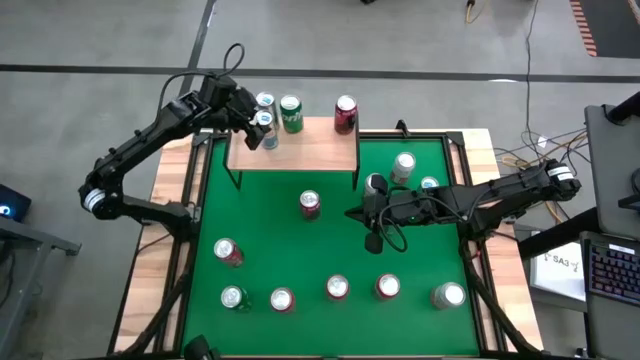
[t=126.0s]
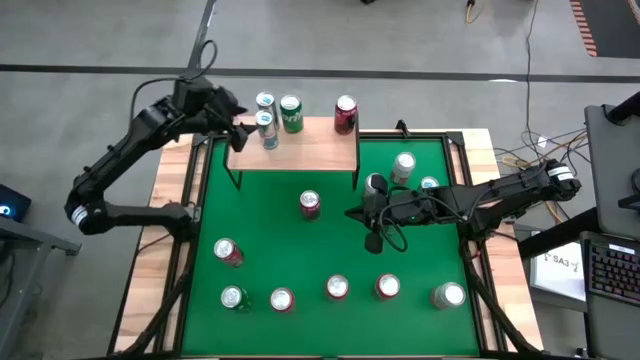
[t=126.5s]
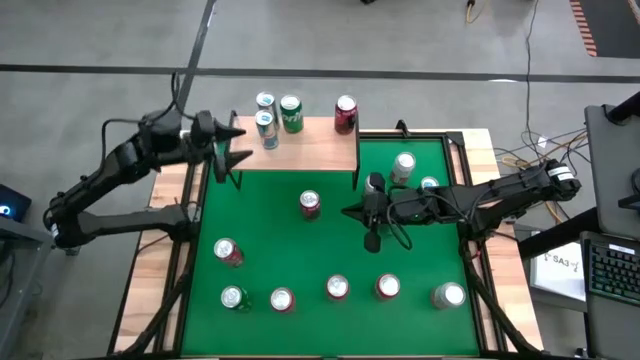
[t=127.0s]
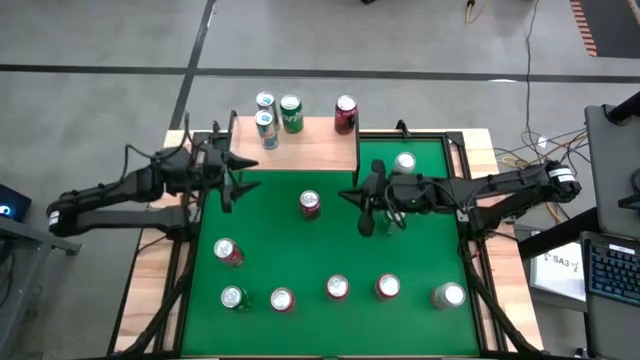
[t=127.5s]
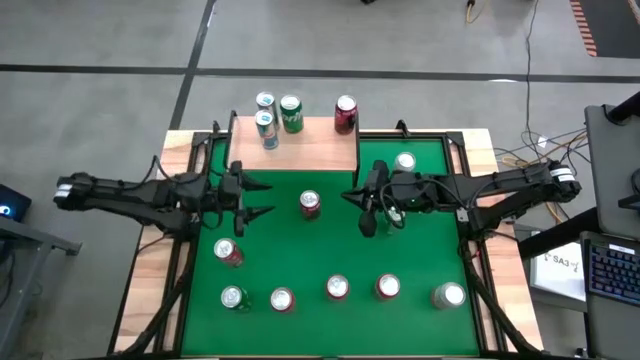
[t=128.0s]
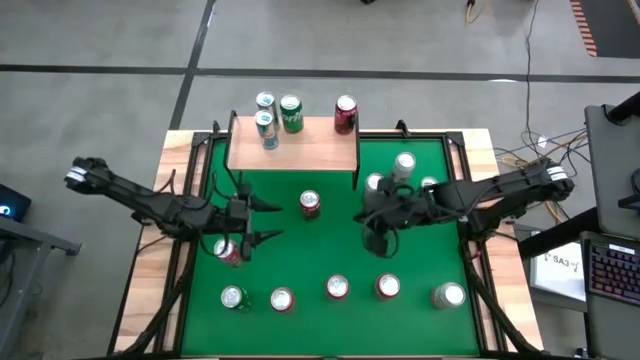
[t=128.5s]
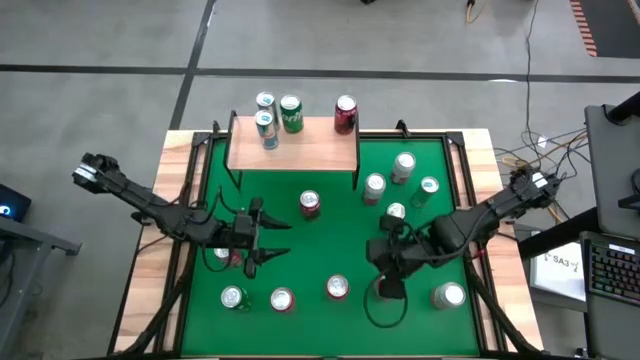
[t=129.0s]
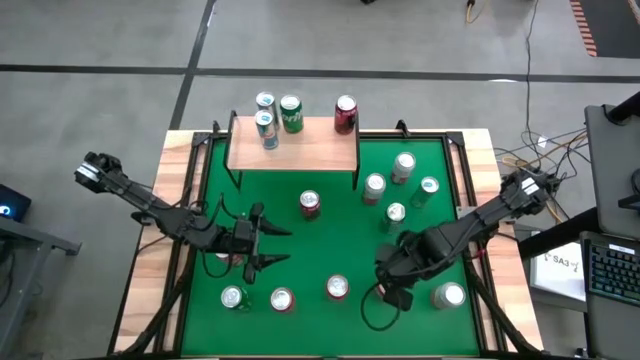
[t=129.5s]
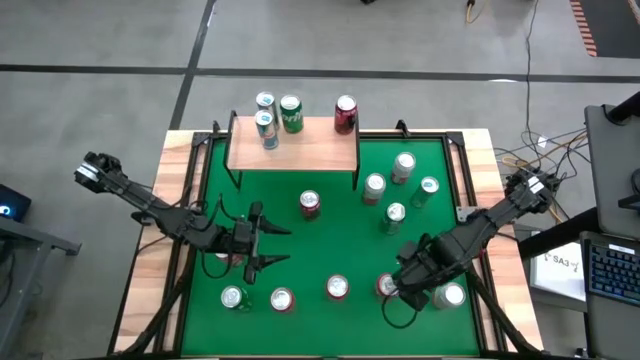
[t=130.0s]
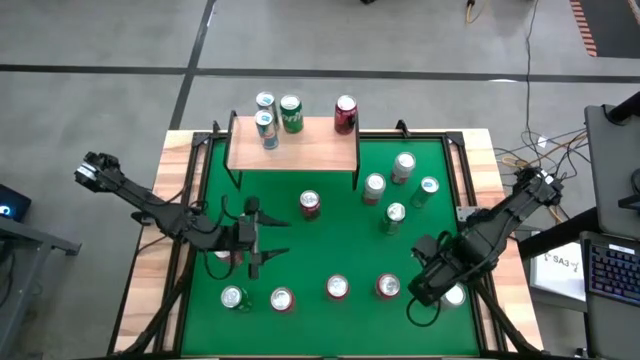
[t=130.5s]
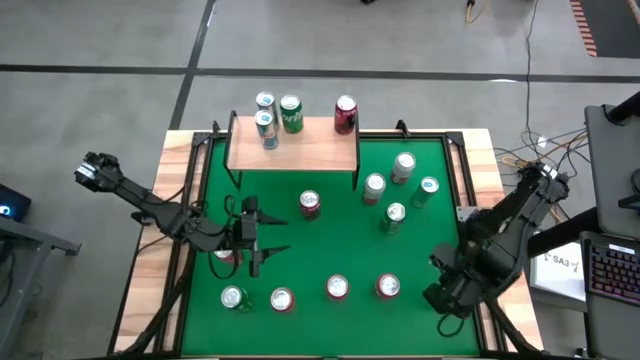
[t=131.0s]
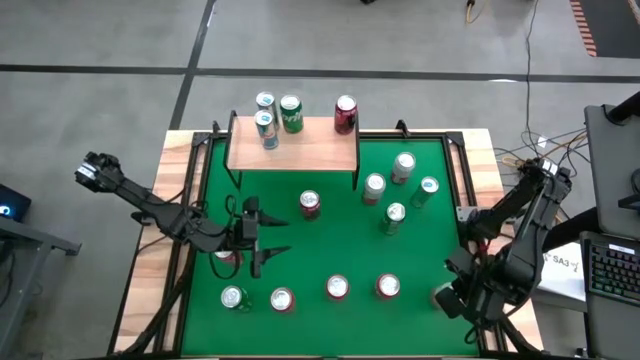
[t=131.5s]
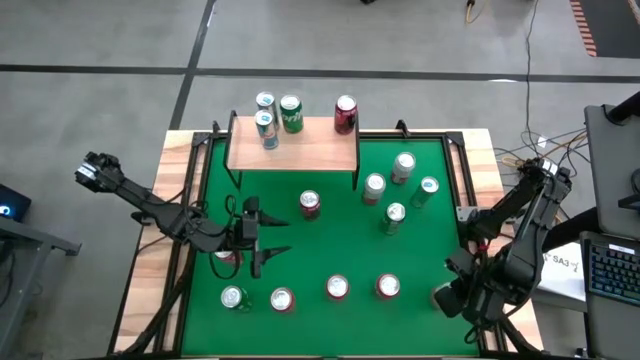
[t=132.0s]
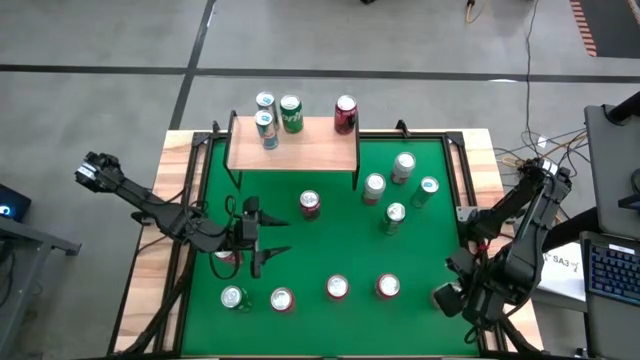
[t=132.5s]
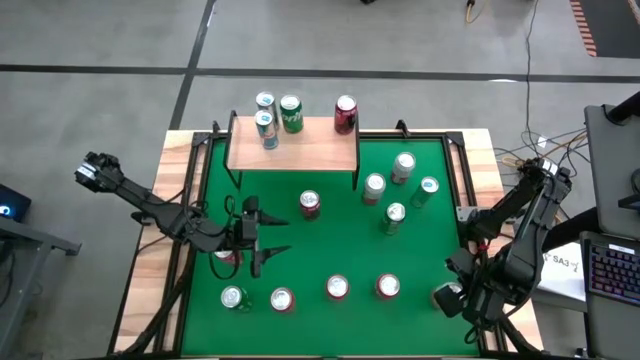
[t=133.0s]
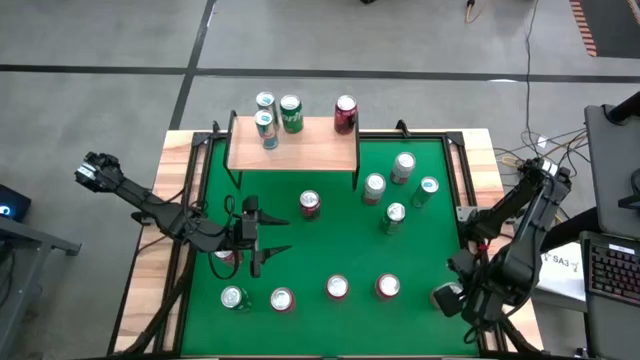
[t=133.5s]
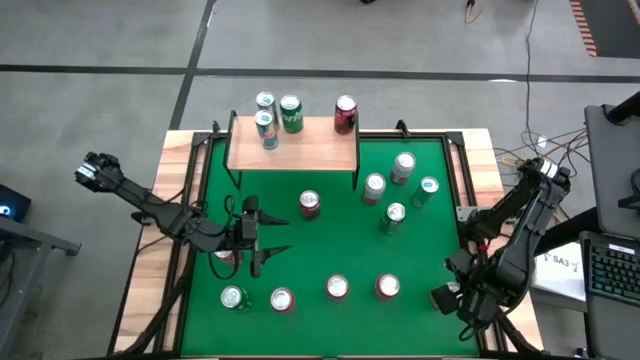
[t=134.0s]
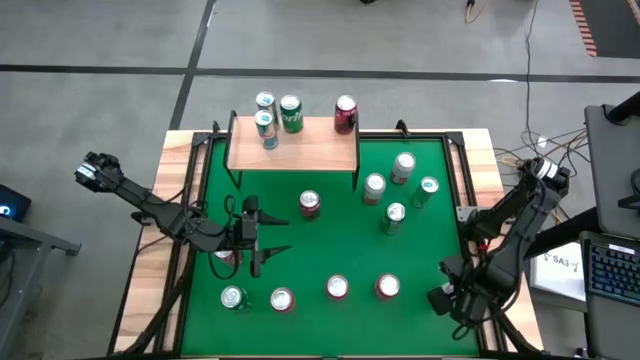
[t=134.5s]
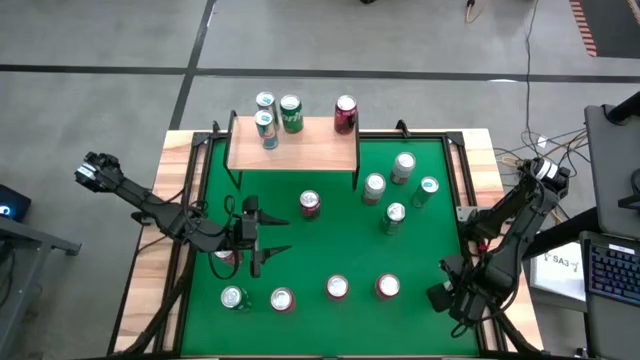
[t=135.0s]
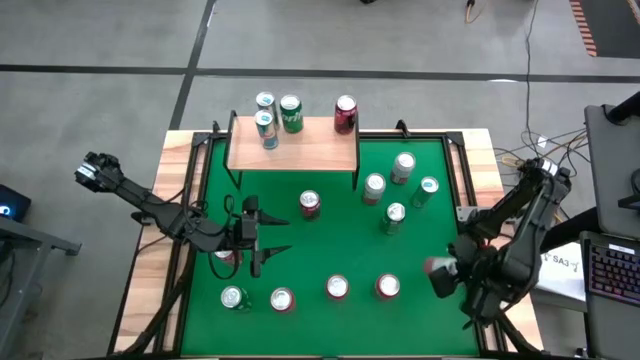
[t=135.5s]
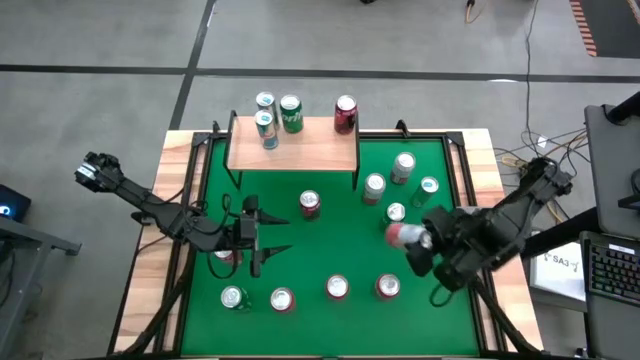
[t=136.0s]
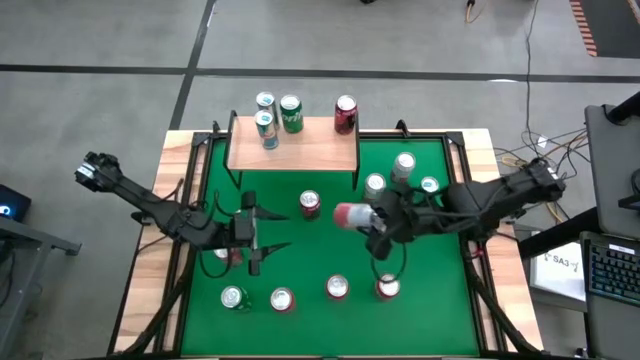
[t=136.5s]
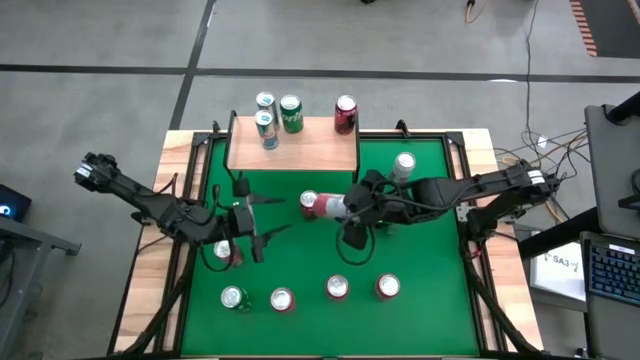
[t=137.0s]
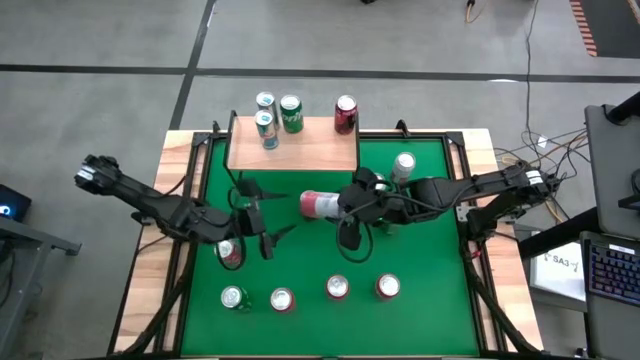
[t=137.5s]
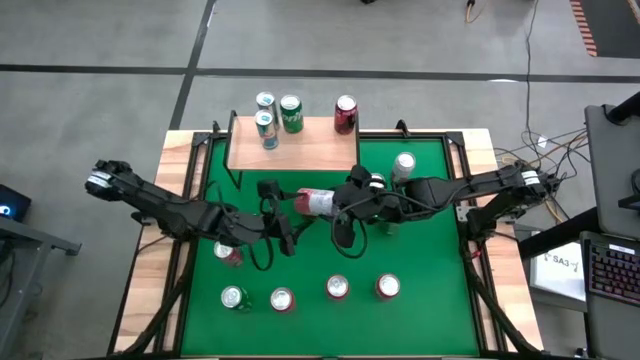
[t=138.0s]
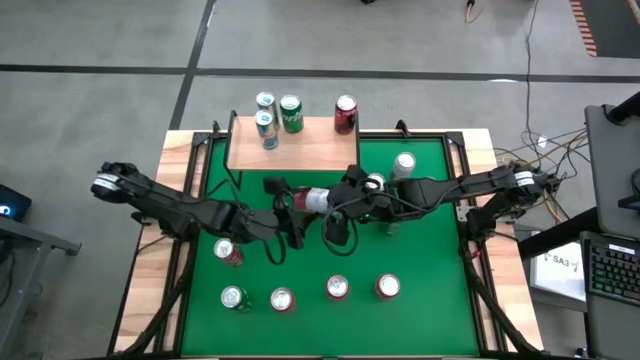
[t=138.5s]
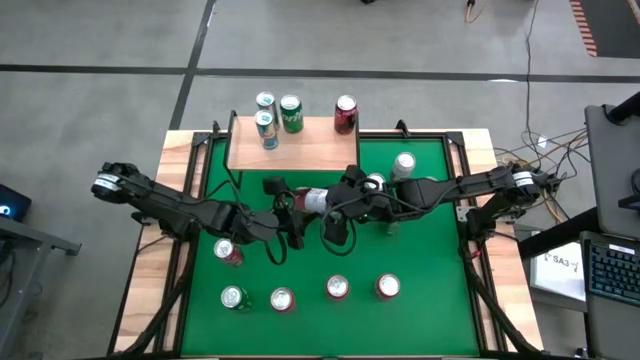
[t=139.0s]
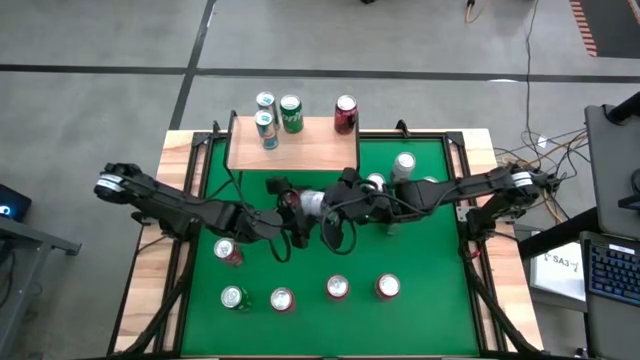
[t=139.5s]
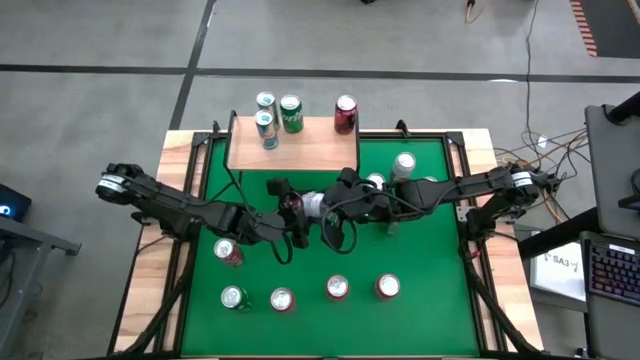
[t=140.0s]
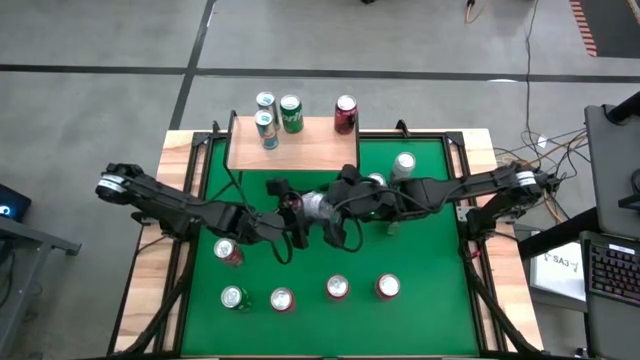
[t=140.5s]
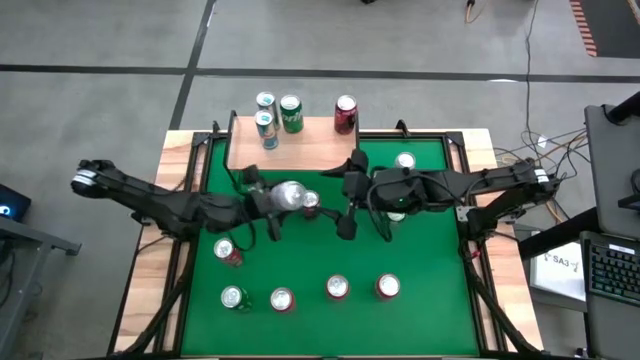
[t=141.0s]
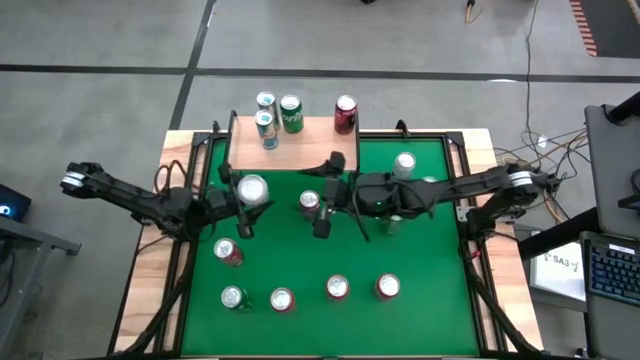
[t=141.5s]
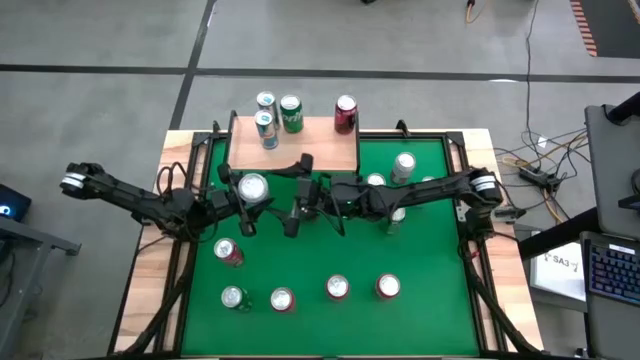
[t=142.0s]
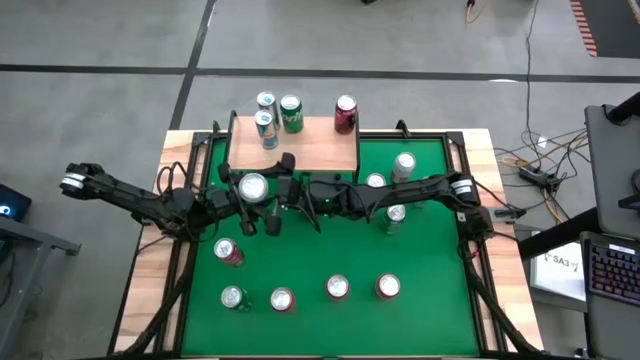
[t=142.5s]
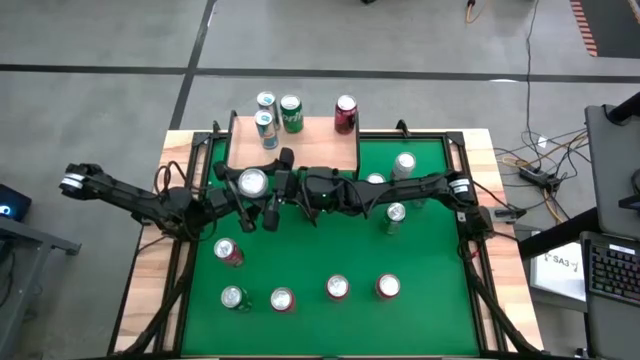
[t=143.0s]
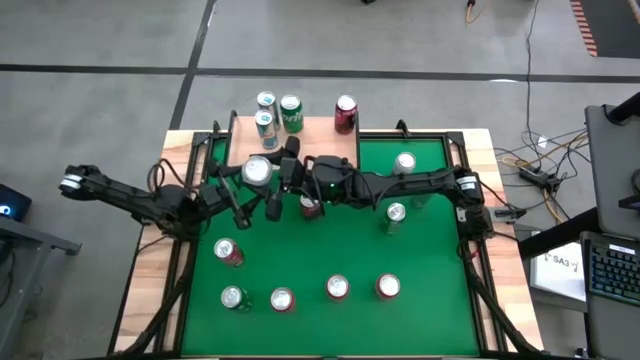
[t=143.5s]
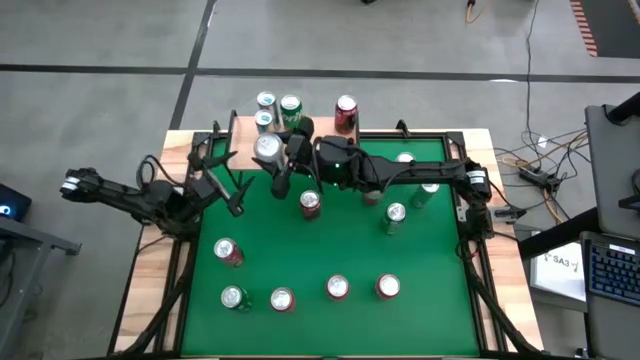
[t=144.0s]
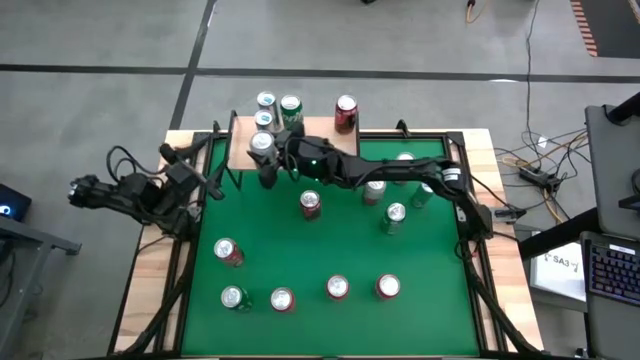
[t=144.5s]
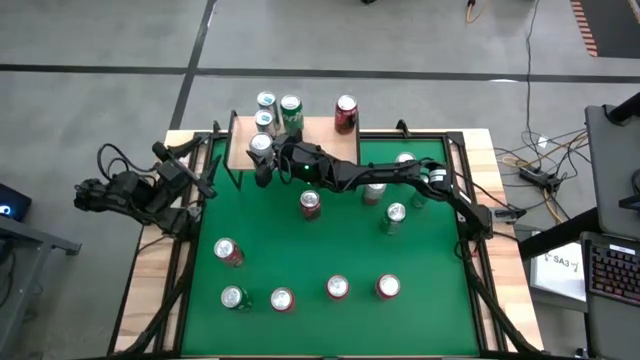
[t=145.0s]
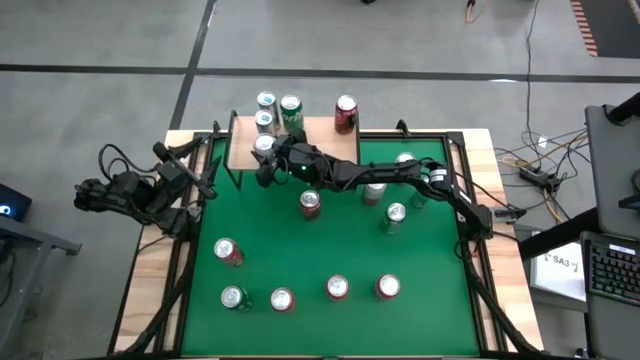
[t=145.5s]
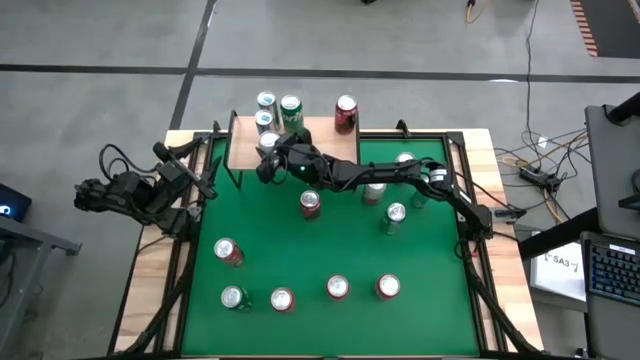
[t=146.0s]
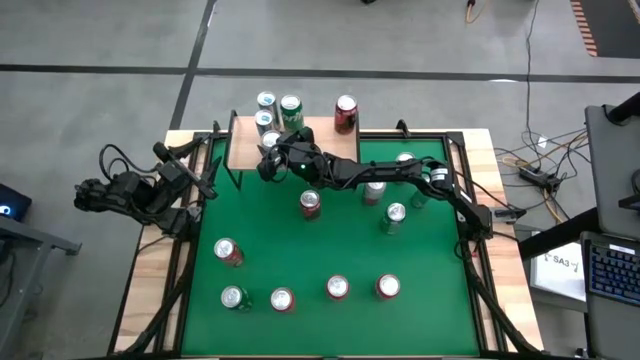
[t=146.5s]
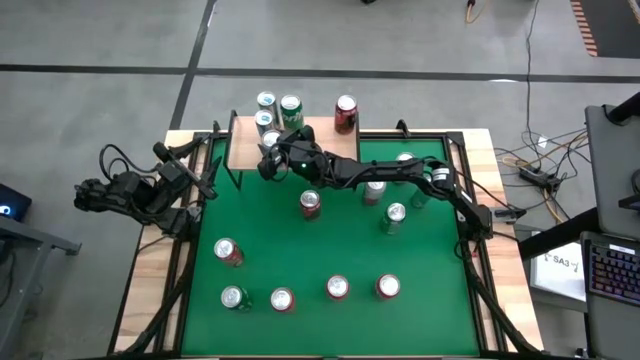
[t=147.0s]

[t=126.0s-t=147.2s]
Task: Place canned beverage on shelf
Put the white and red can on the shelf
